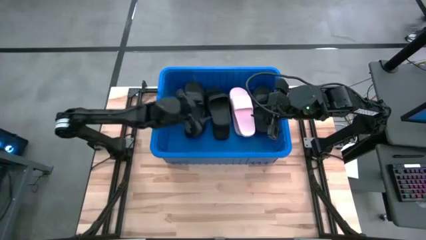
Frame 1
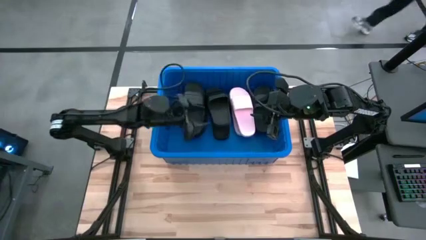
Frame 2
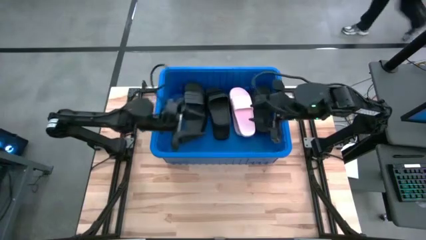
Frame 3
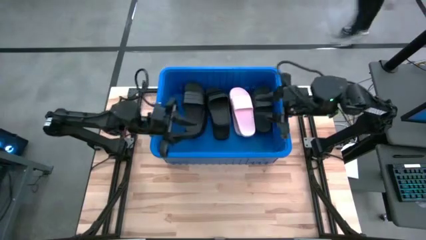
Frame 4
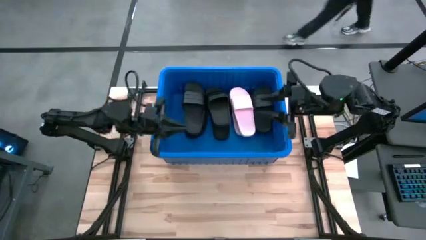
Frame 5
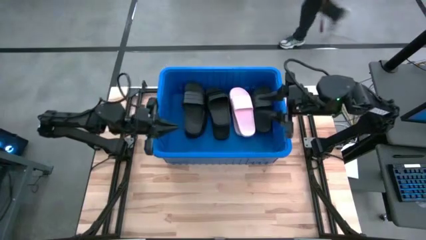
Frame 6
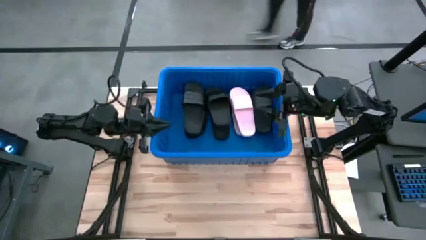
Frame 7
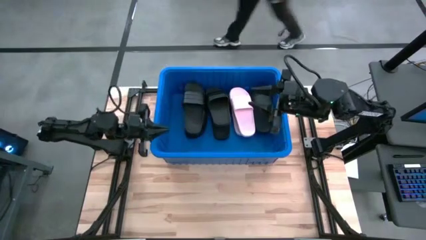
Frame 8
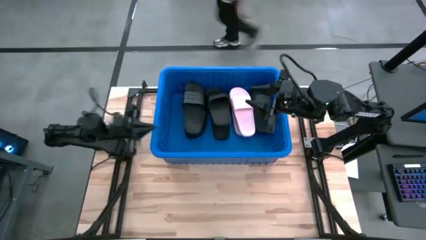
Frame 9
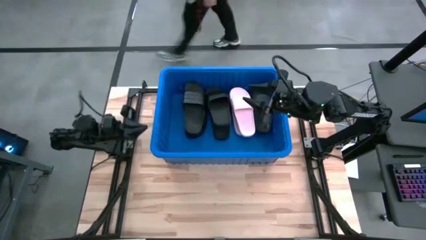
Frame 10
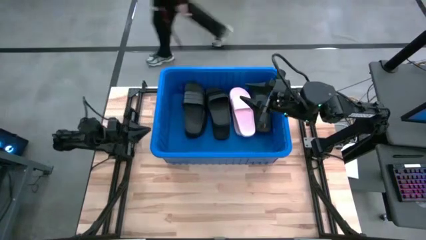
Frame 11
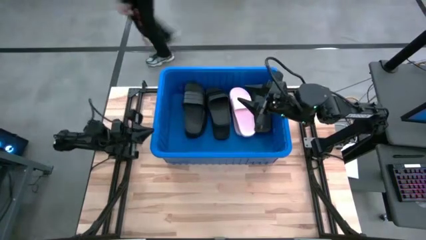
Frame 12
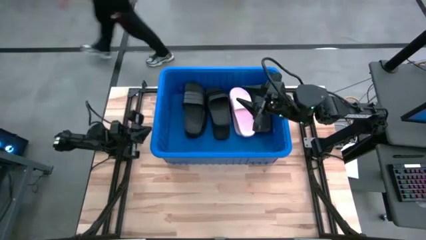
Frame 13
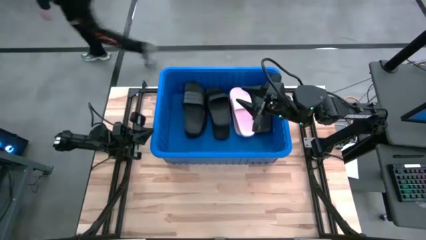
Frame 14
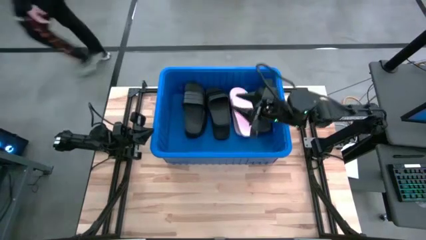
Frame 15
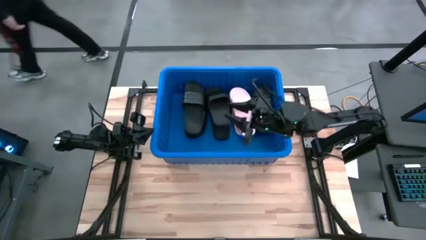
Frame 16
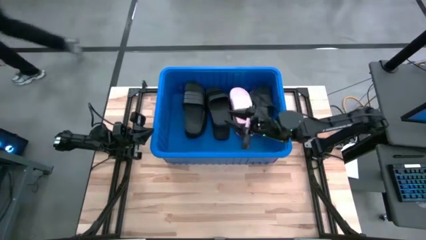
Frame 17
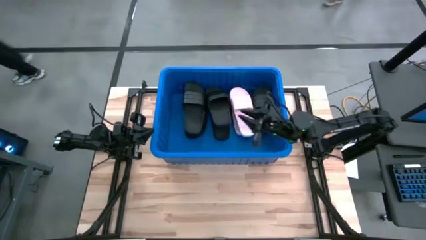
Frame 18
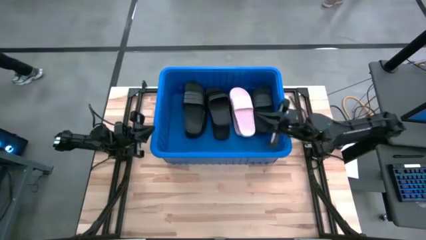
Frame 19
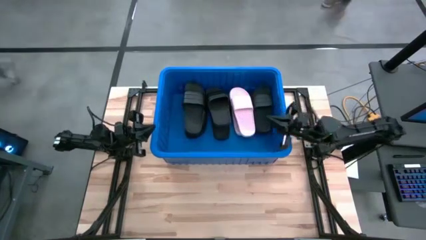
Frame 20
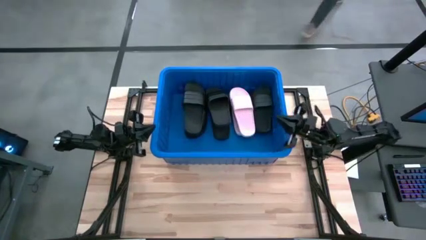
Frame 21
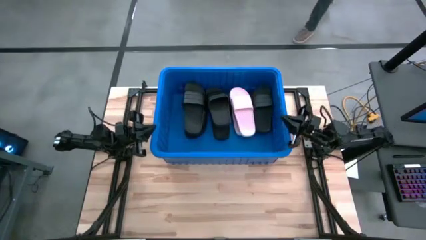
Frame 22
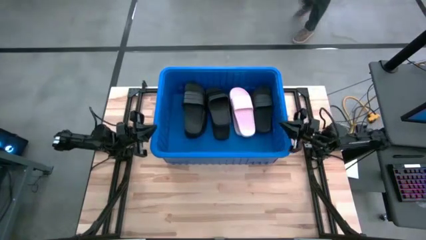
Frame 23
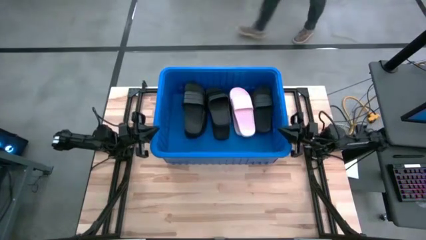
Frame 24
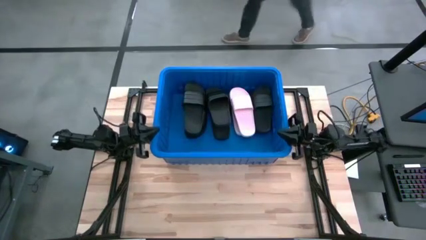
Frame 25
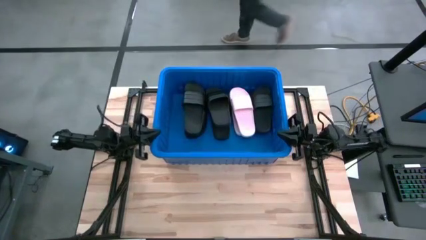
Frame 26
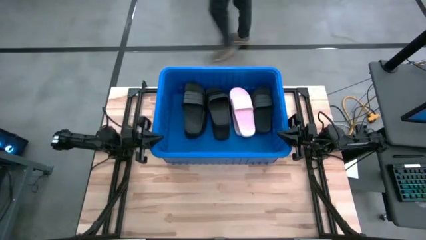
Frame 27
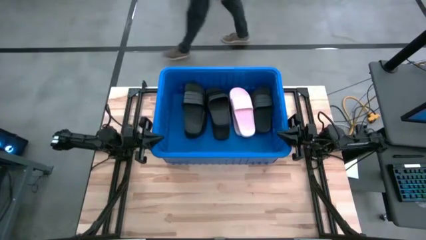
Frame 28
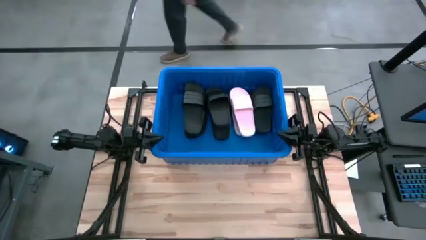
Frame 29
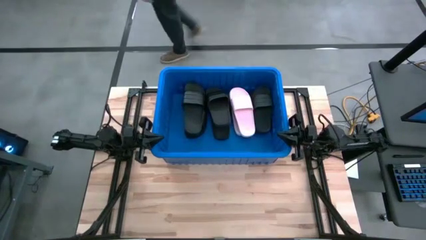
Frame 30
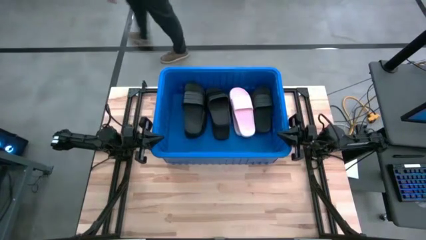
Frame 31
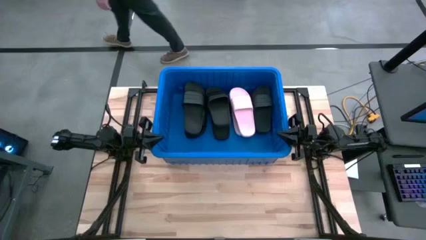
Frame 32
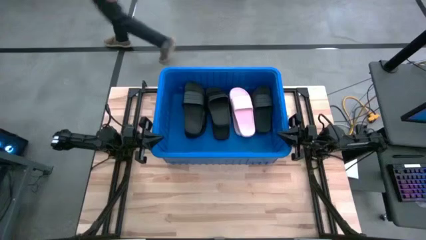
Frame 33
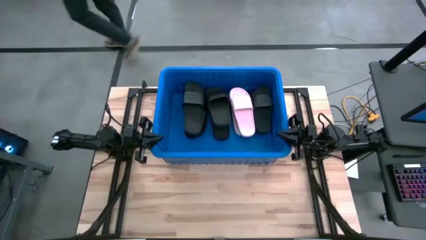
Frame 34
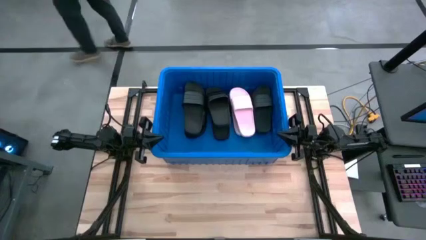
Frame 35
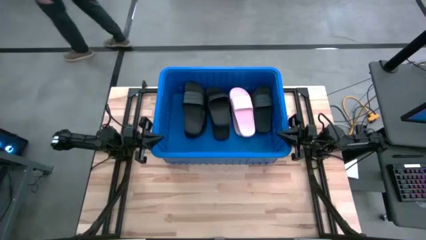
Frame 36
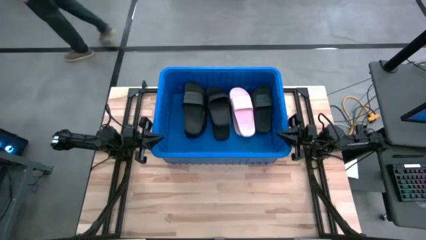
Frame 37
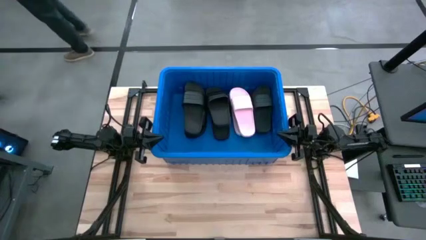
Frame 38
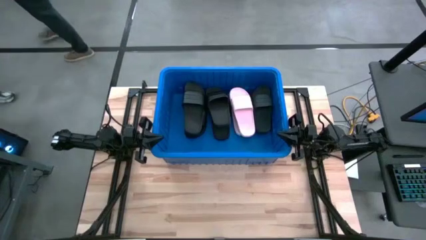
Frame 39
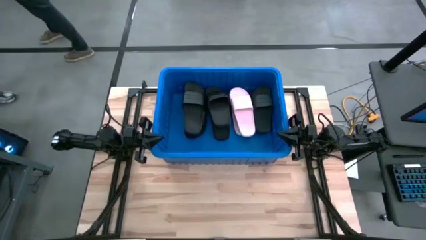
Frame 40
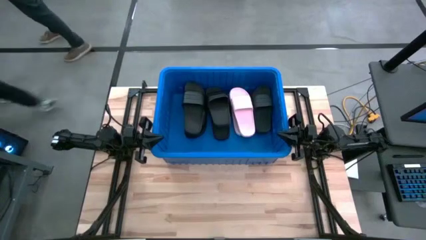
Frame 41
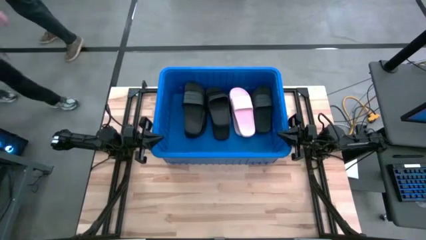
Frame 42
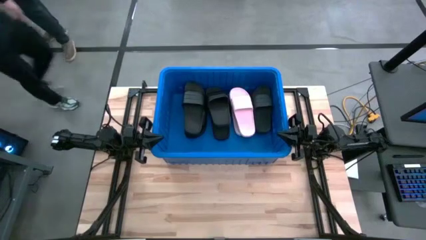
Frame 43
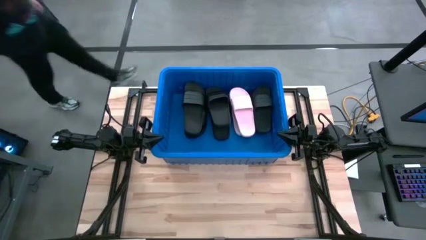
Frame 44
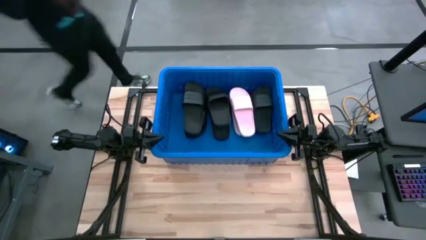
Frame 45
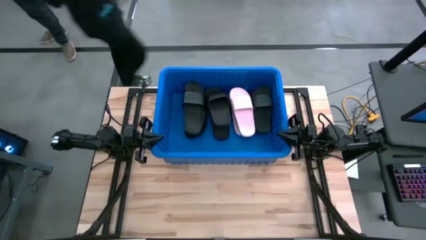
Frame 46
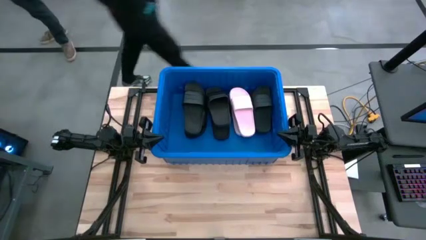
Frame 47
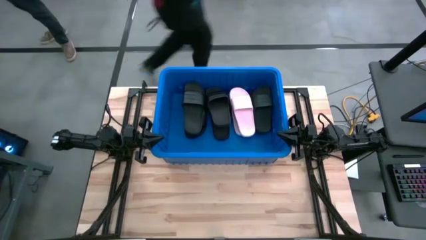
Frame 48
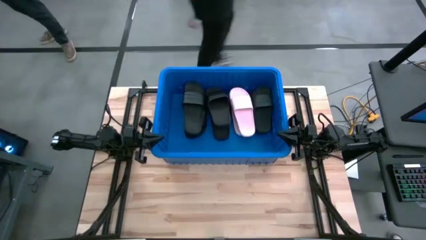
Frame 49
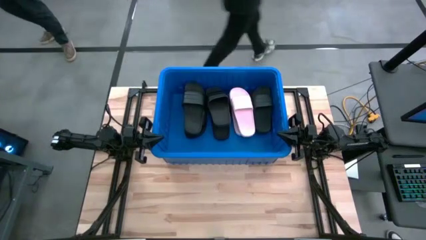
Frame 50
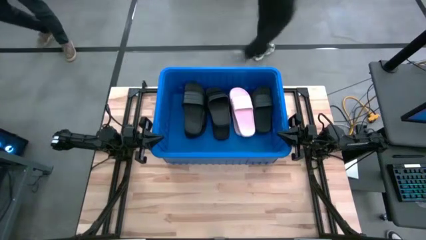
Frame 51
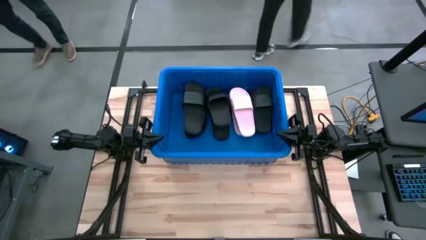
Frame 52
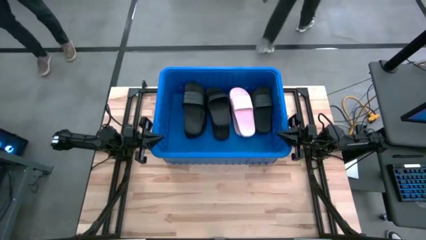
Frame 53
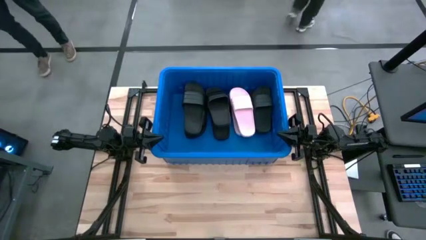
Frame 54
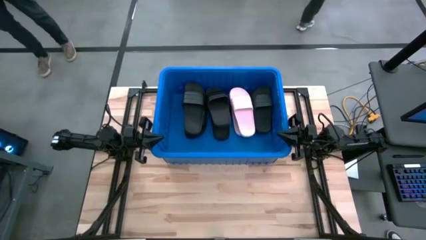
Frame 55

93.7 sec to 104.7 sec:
Task: Pick and place slides into bin
Return to Home Position

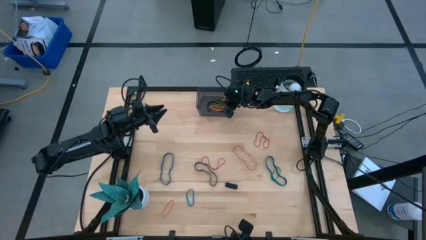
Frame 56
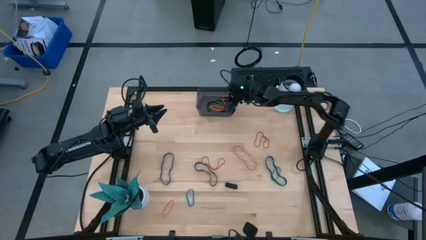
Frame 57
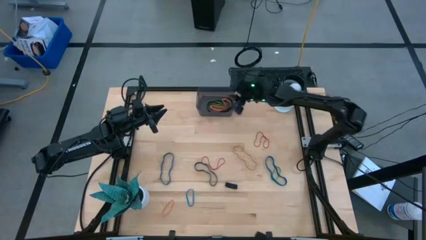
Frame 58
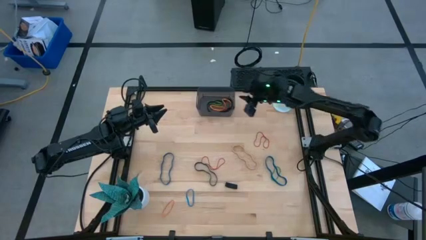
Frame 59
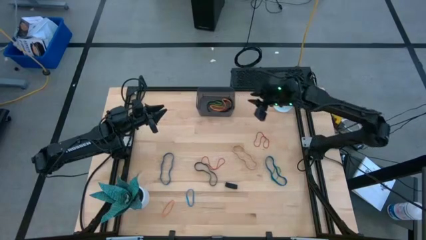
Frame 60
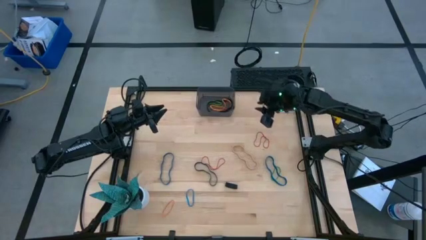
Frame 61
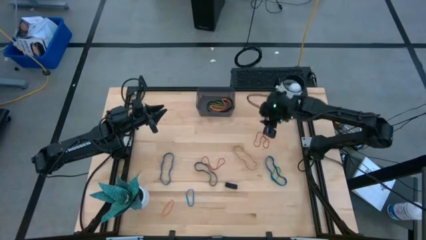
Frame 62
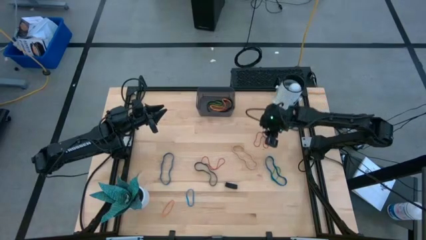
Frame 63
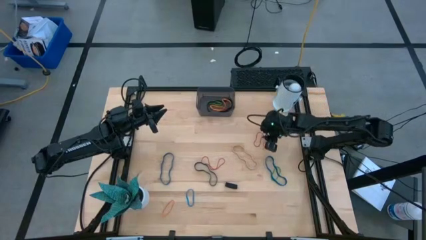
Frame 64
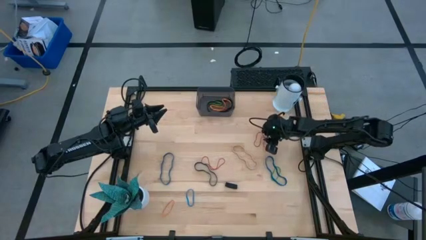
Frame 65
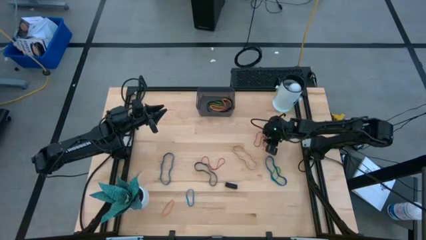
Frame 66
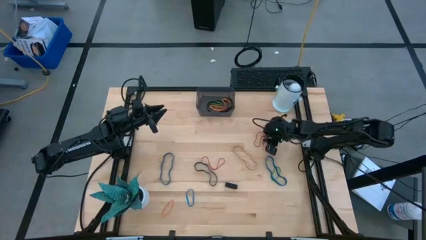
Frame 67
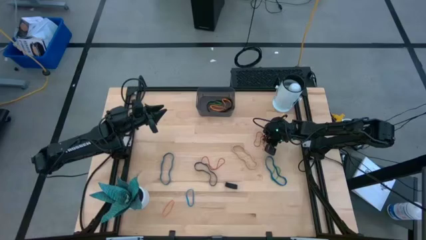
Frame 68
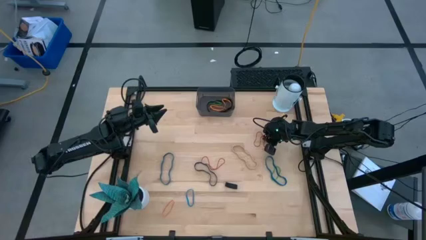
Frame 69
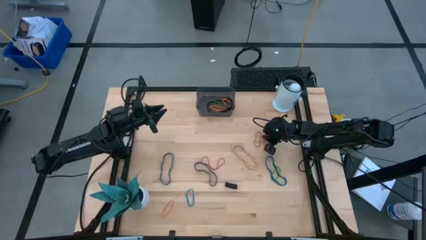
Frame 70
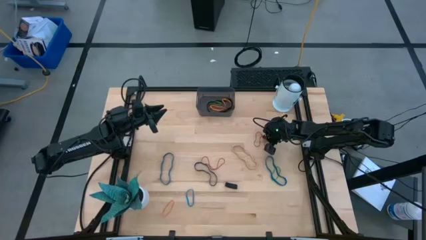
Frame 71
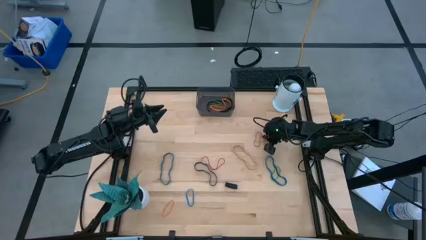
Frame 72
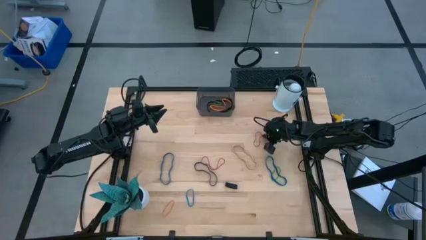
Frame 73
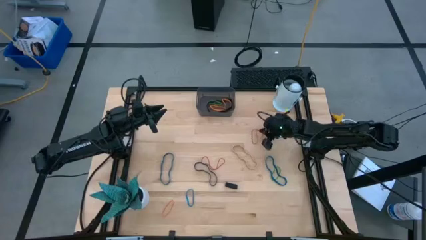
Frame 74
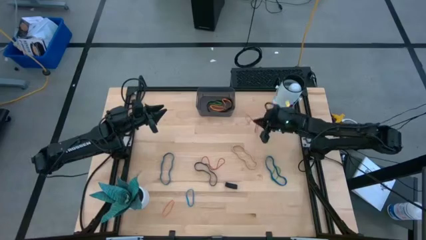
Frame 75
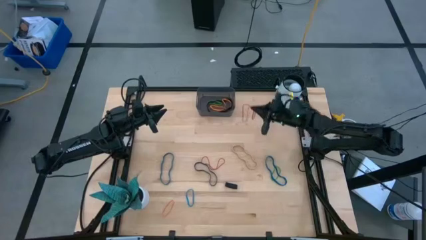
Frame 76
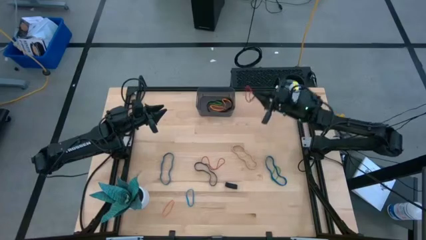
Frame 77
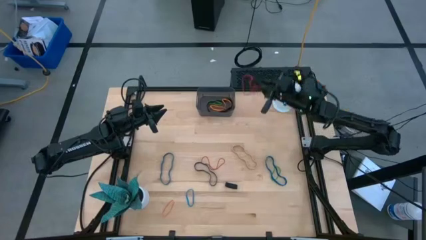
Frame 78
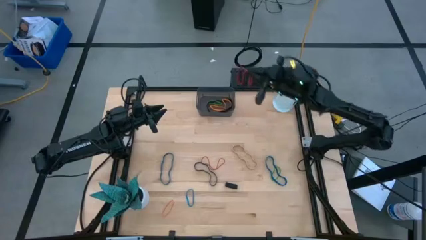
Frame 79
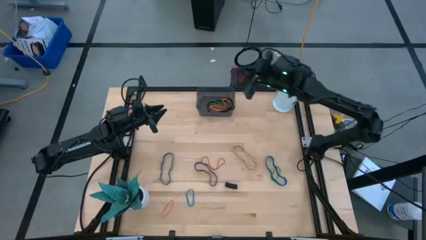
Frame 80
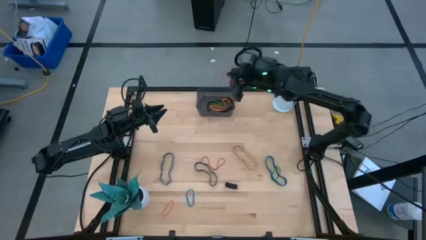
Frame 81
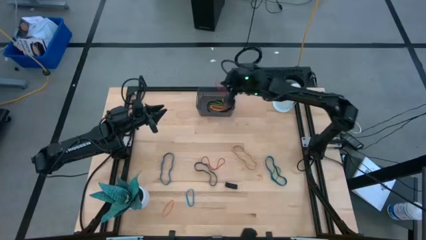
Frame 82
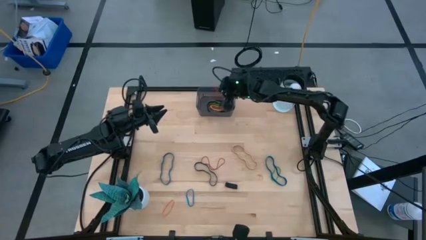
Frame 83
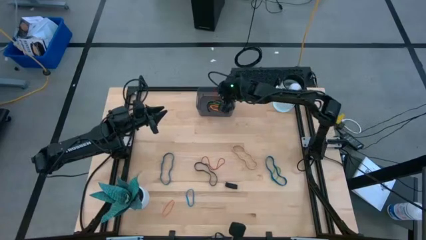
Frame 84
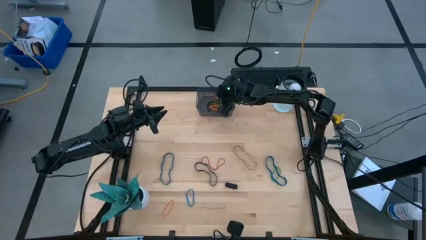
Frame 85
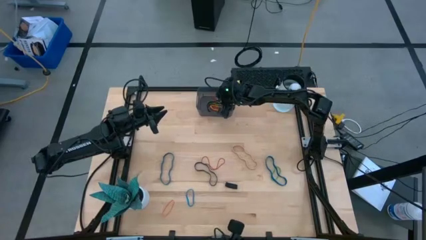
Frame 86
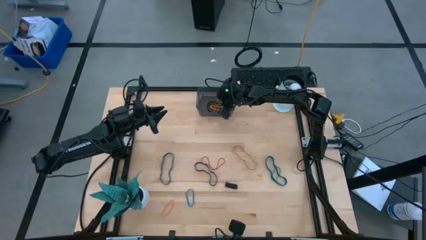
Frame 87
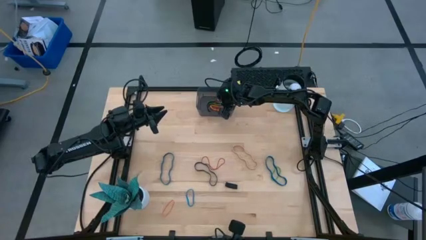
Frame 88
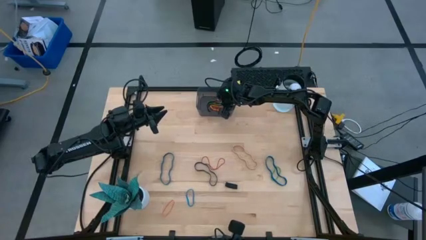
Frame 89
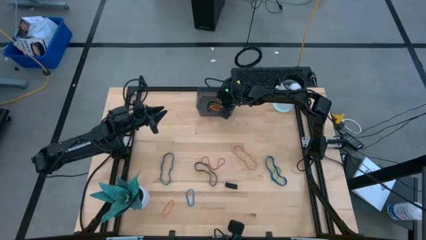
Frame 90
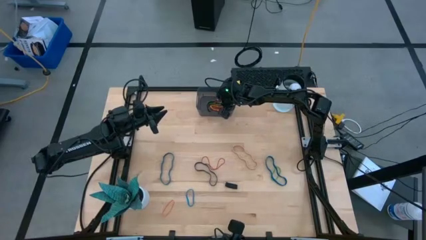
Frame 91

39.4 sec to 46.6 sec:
Task: Pick and place rubber bands into bin
Put the top red rubber band into the black bin
